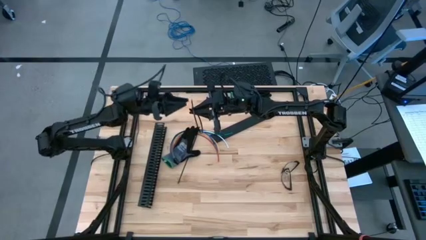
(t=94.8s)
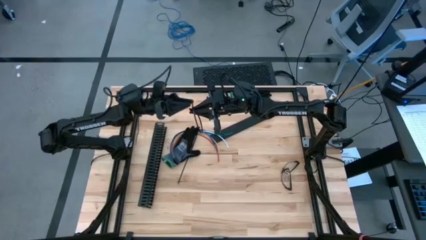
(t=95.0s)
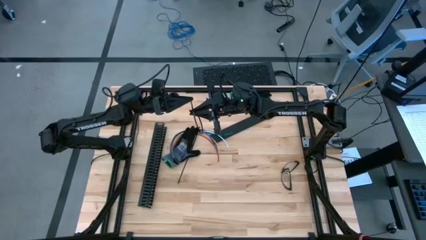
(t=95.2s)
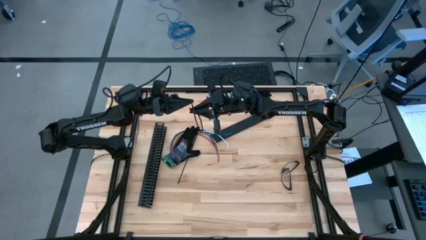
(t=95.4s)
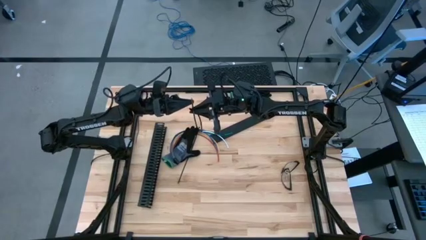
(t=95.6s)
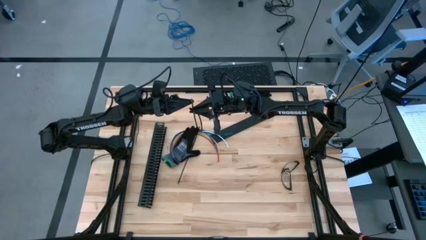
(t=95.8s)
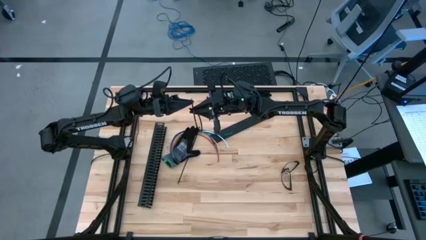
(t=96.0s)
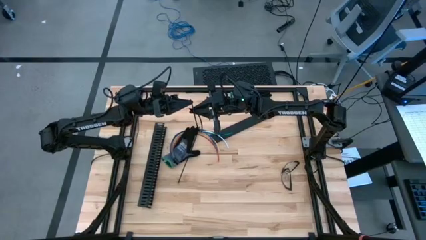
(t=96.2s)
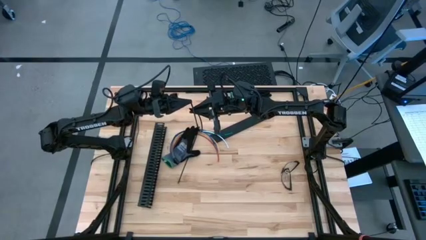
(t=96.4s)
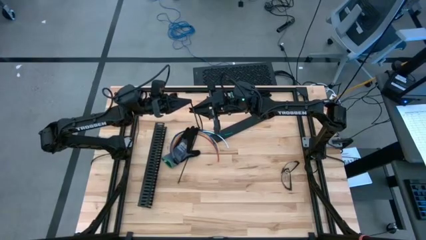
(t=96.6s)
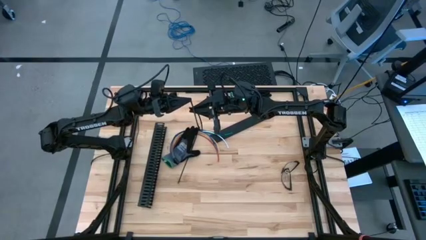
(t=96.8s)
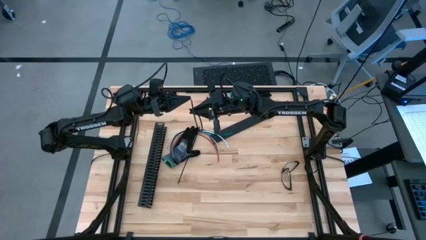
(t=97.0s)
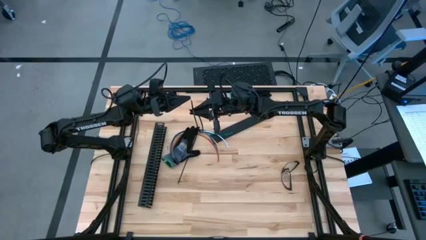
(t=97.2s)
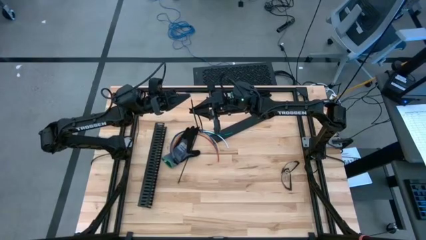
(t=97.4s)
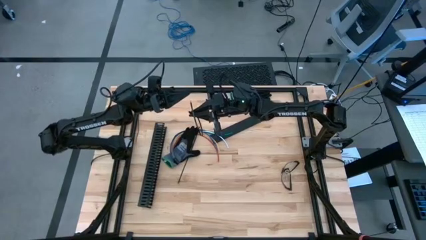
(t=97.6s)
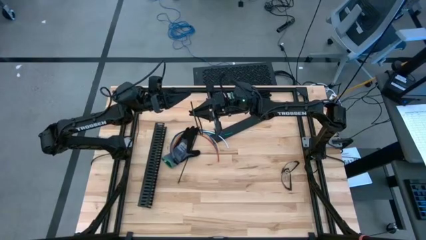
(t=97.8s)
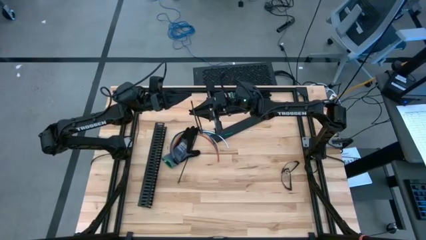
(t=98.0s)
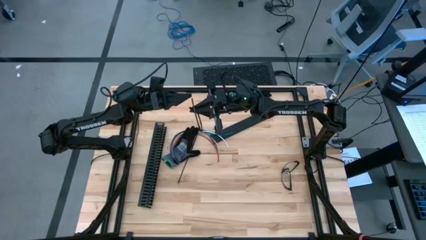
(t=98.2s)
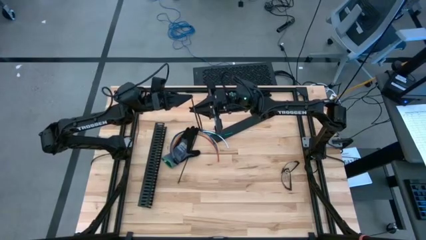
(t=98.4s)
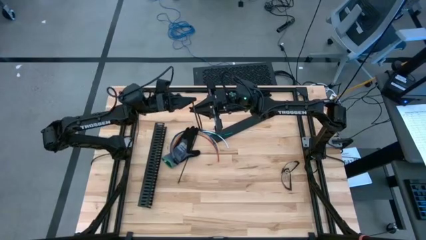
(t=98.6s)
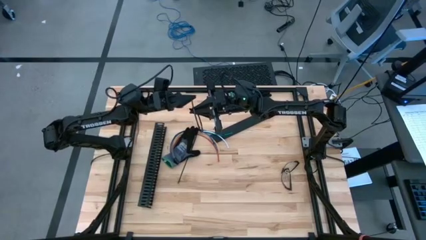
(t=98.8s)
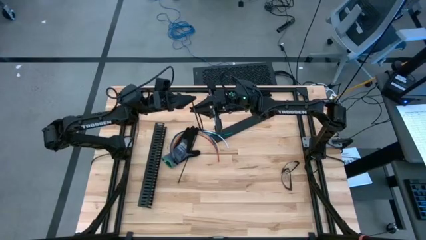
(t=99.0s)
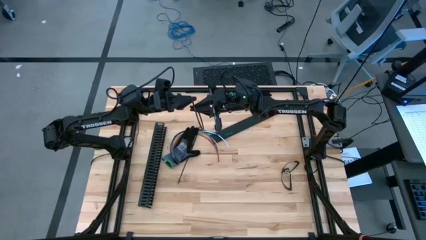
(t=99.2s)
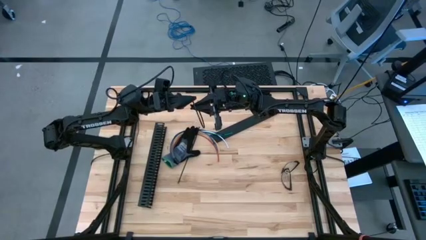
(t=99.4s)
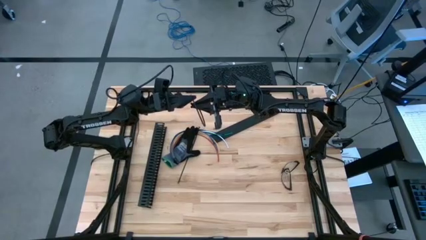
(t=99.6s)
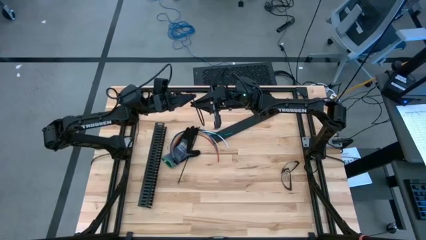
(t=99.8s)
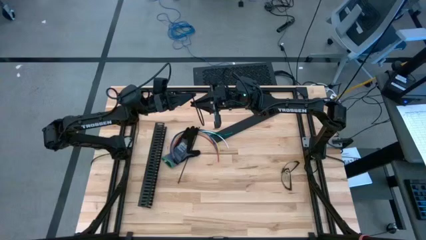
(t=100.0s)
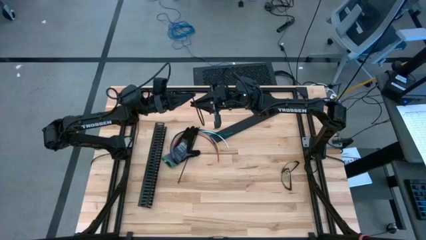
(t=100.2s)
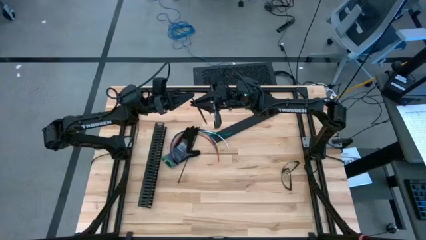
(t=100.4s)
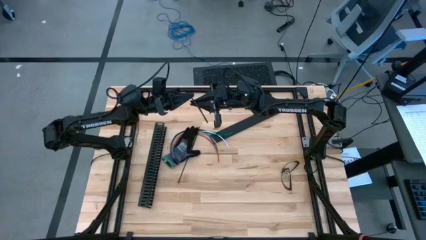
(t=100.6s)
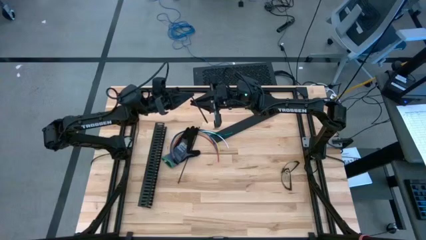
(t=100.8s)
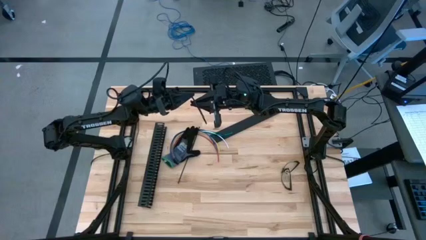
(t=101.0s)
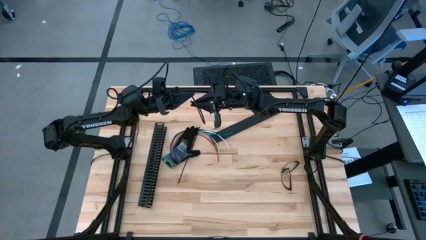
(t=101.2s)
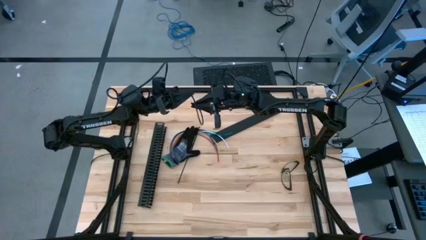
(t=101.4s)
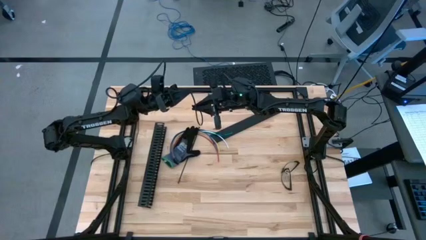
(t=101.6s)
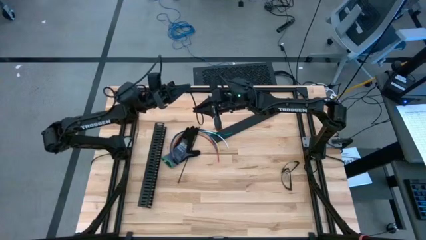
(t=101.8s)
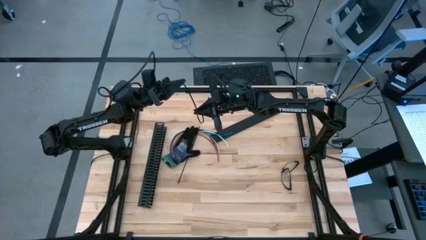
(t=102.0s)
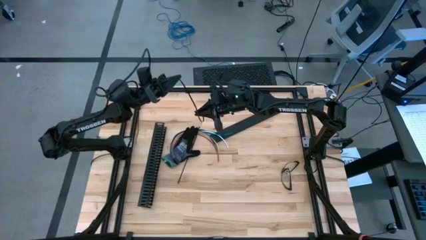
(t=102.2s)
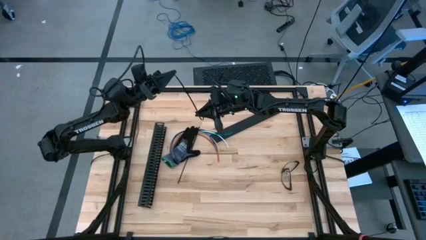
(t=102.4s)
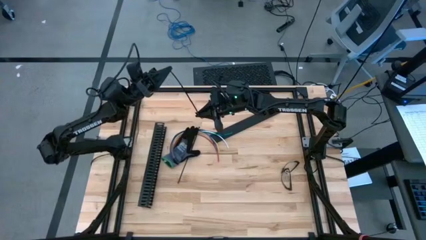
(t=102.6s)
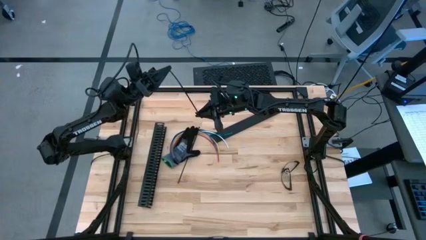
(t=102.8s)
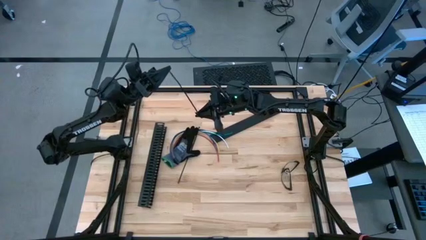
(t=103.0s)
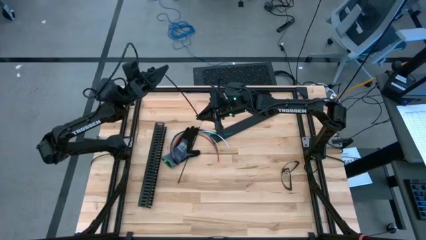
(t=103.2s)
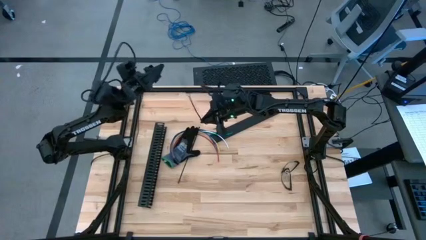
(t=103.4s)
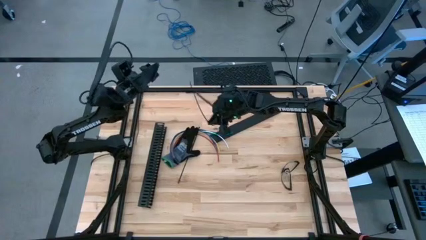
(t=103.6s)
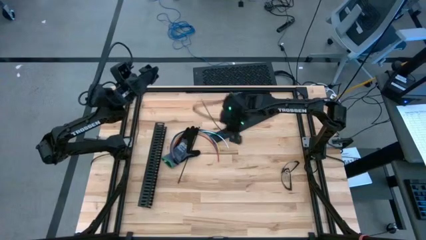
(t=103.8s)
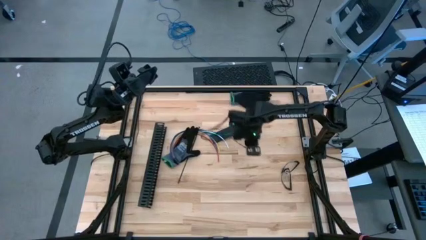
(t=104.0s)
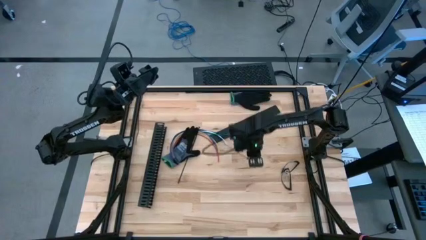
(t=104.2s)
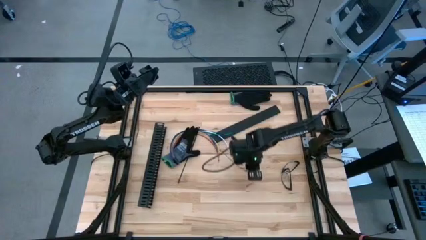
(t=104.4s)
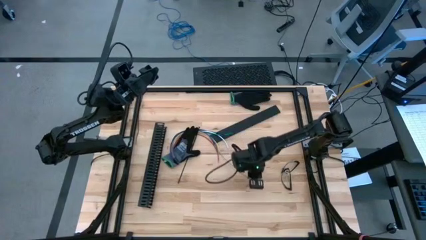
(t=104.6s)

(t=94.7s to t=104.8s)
Task: Ziptie cables
Wrap the cable wires with the black zip tie
